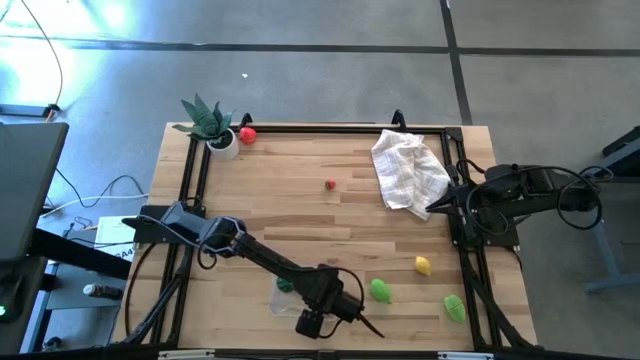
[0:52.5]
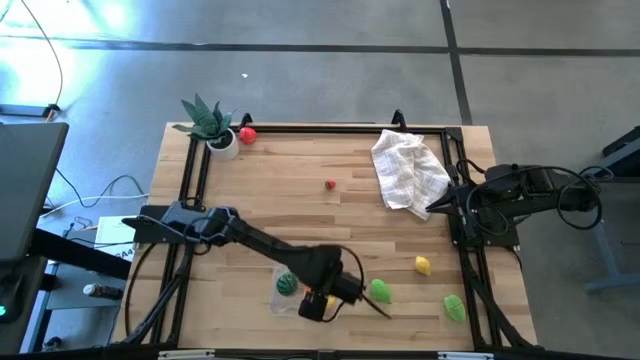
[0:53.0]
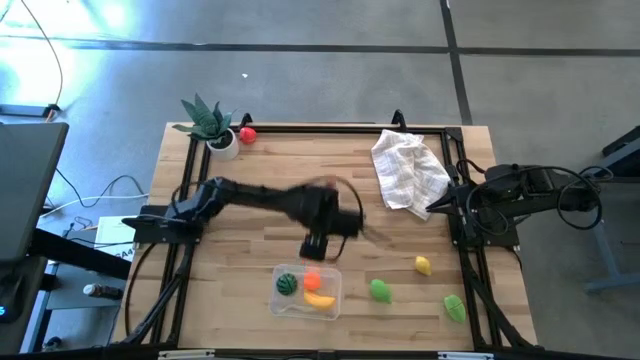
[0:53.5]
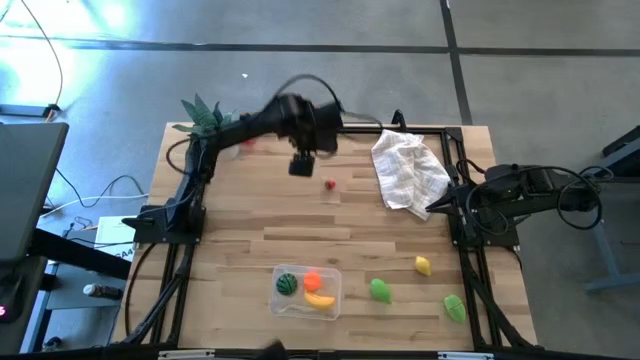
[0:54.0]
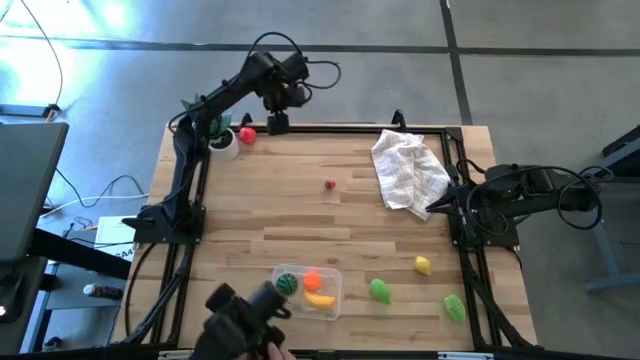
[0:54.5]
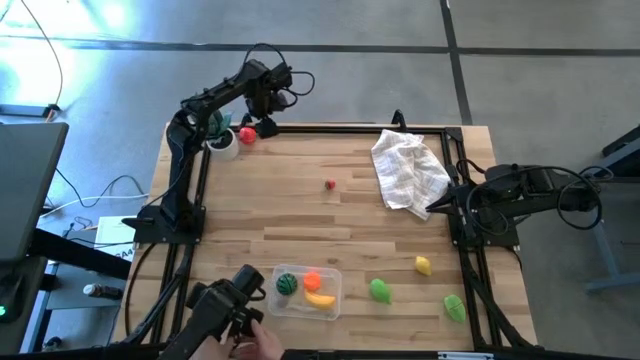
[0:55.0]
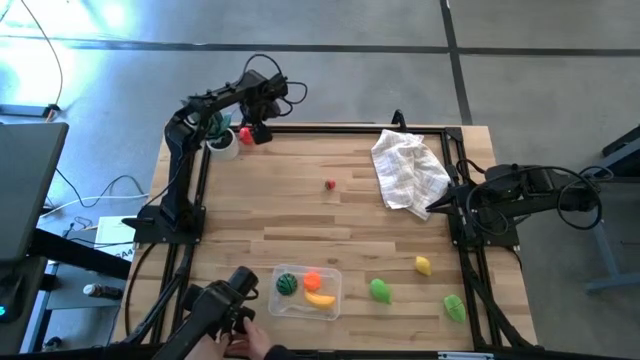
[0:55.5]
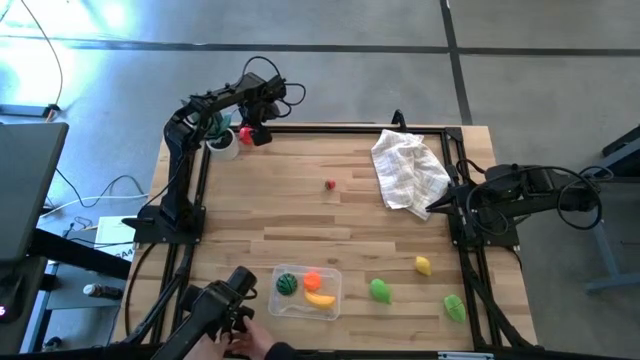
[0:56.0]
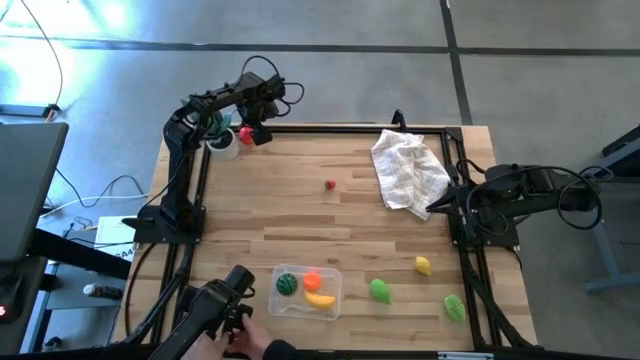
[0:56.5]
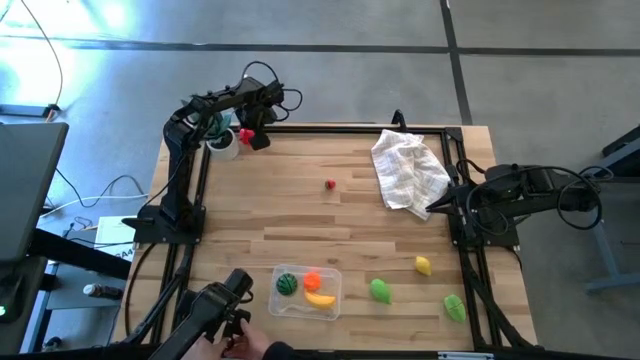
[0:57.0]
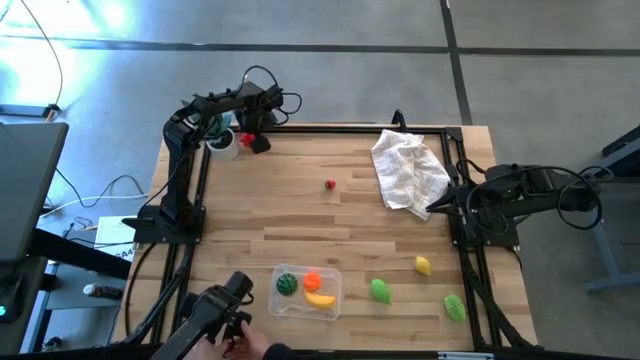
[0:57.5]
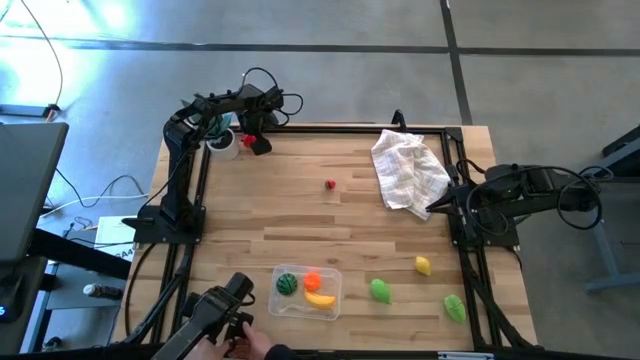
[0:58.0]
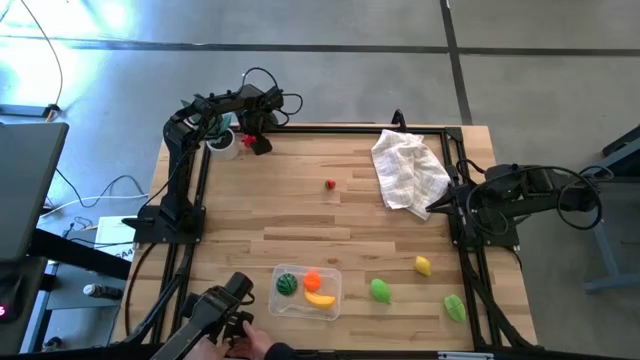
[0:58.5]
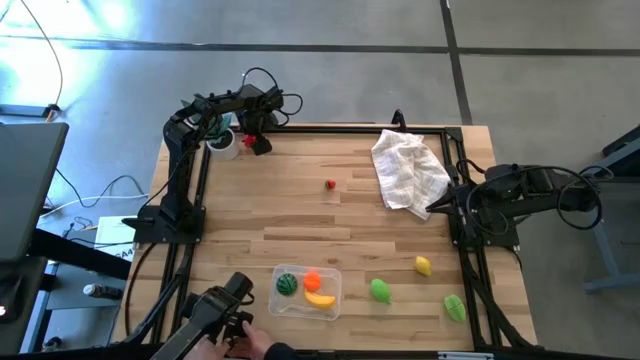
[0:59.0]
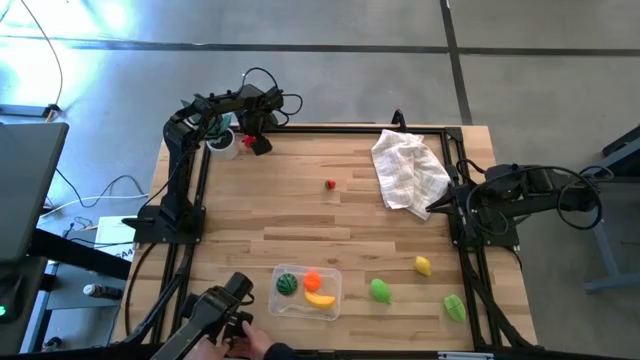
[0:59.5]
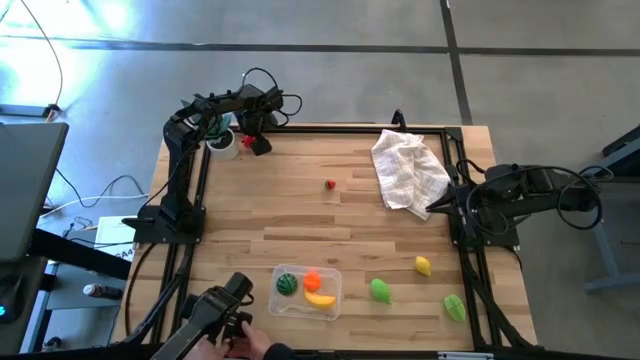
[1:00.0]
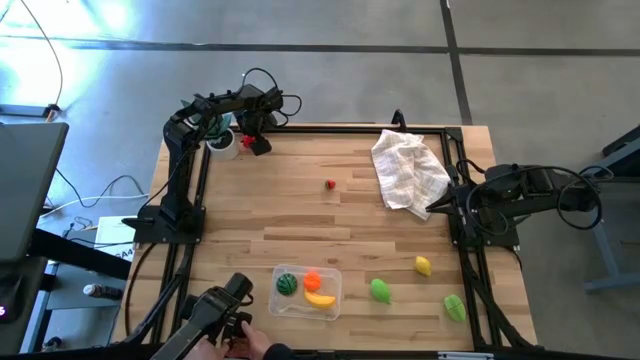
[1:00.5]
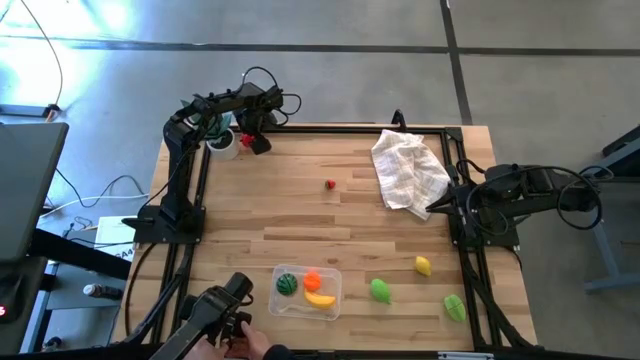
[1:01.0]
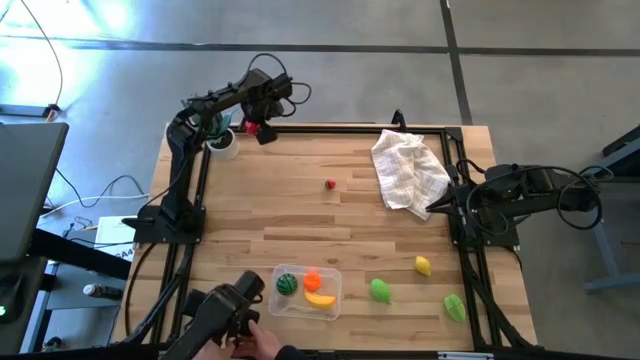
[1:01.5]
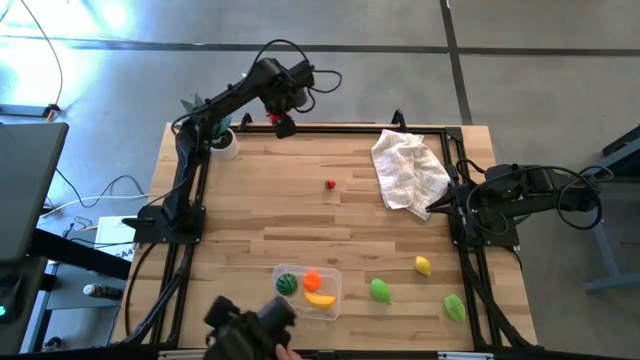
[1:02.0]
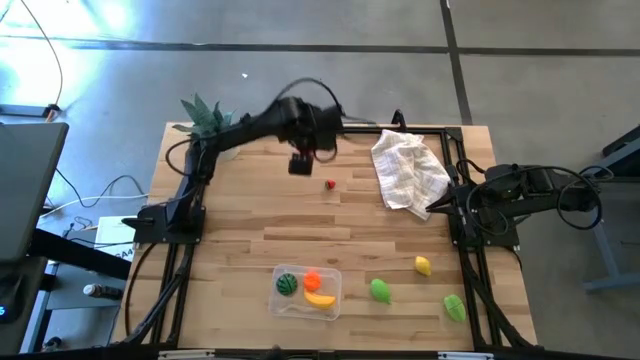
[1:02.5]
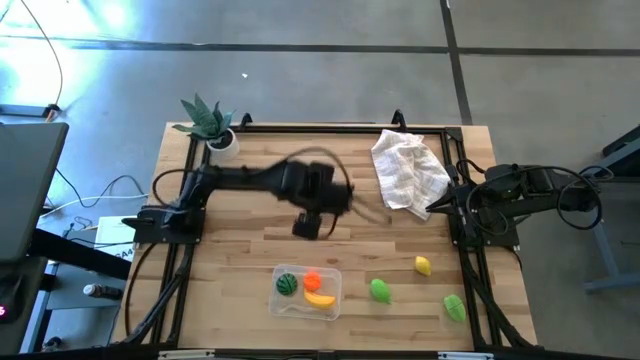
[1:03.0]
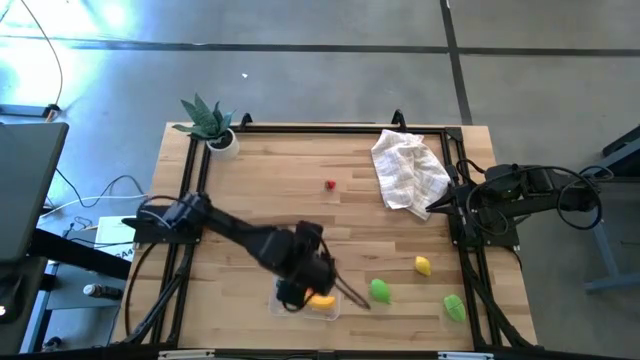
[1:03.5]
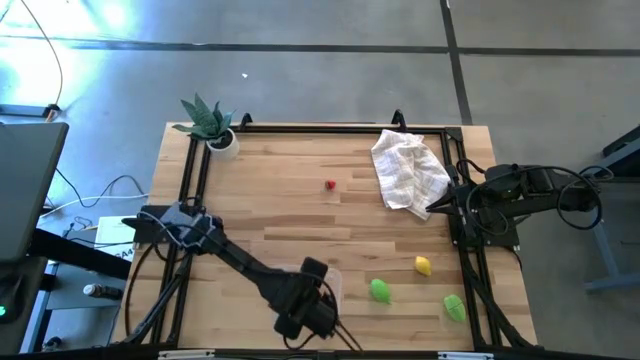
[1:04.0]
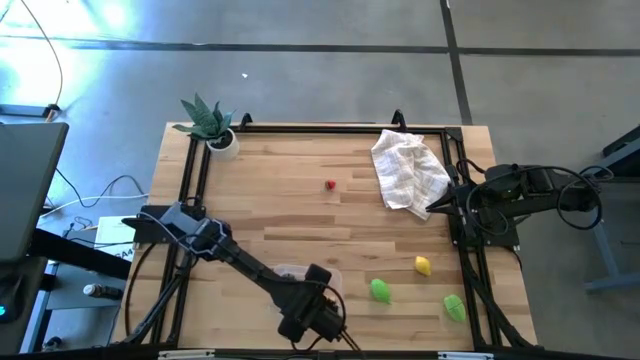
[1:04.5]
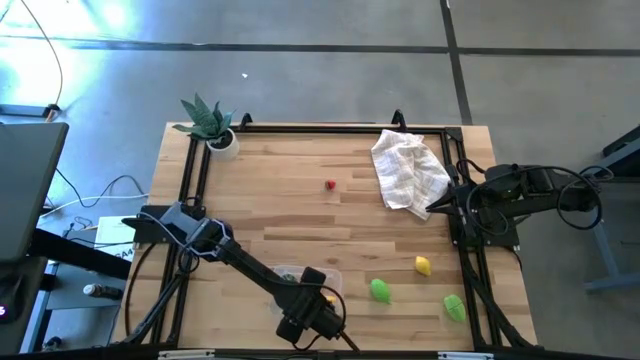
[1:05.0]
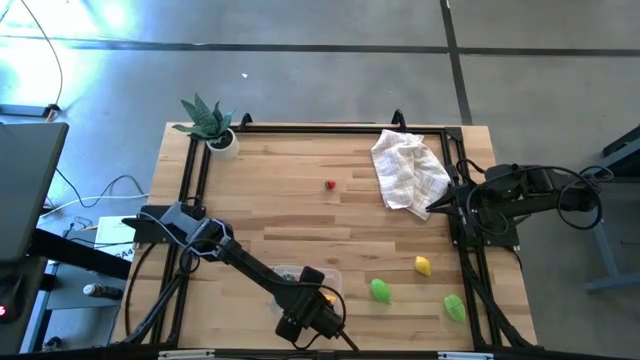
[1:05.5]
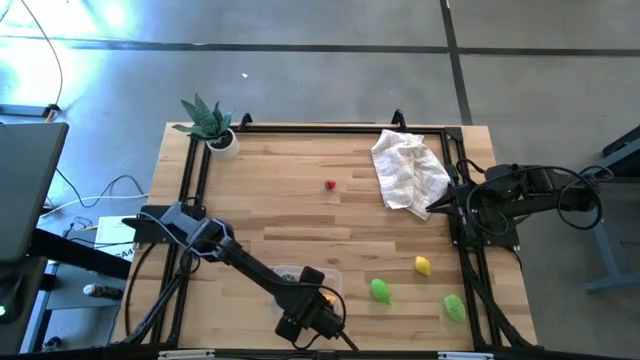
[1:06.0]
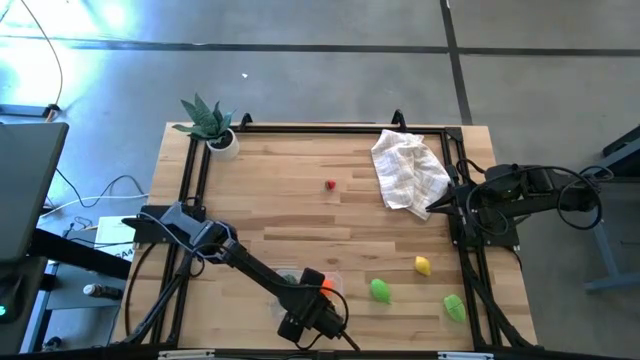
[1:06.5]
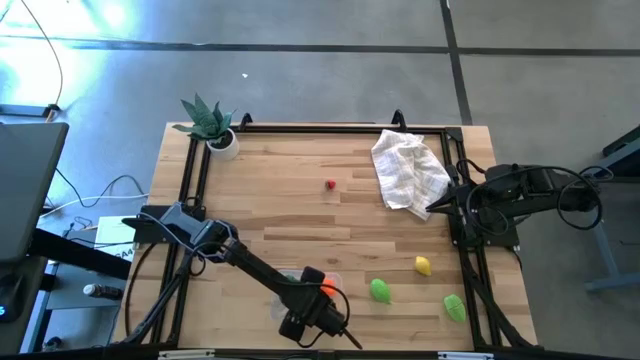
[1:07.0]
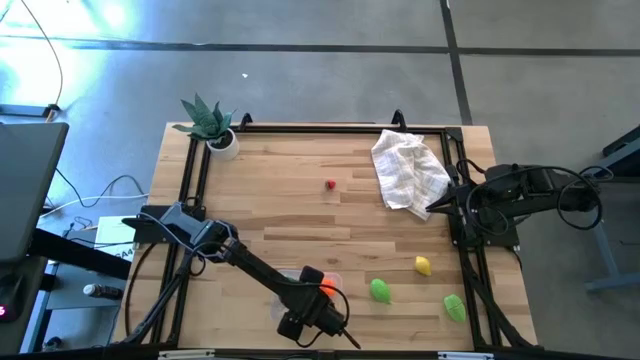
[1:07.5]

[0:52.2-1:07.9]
Task: Pick and placing Produce into tupperware
Put the apple into the bin

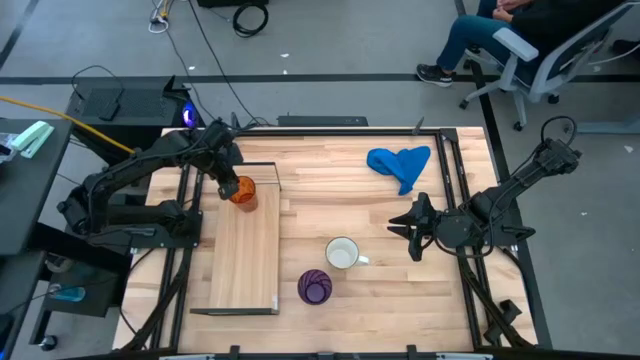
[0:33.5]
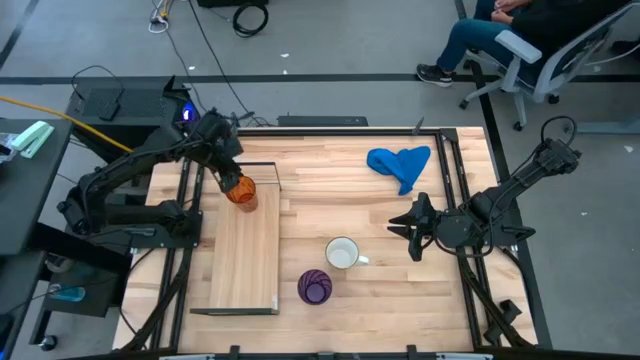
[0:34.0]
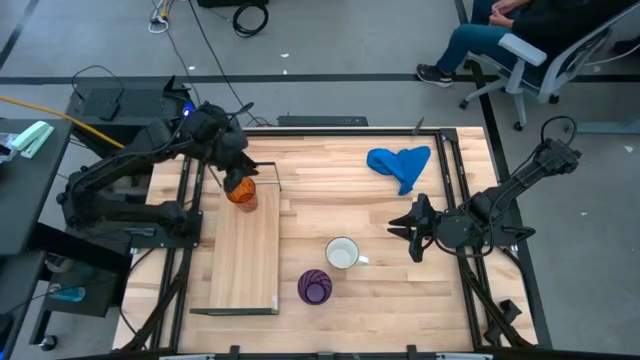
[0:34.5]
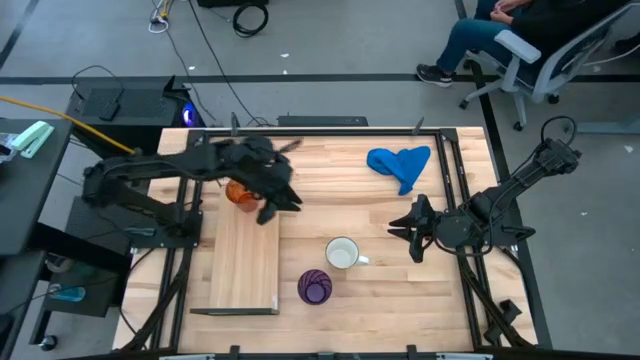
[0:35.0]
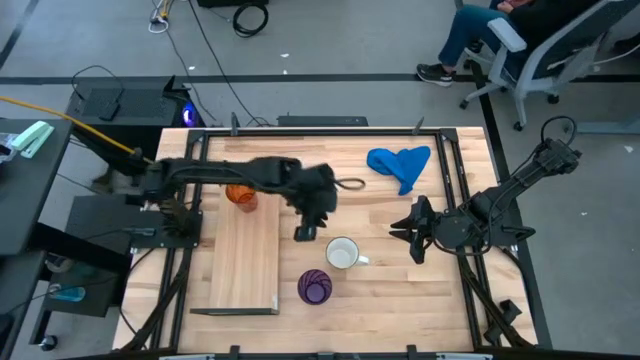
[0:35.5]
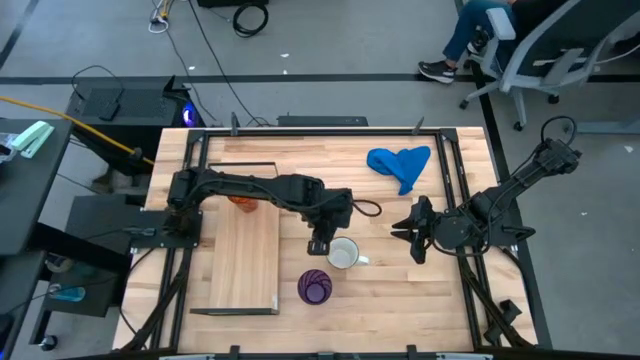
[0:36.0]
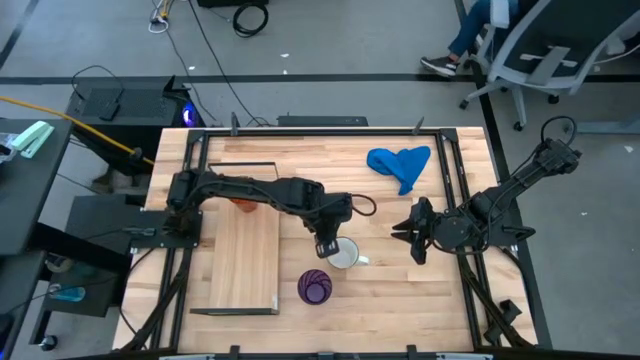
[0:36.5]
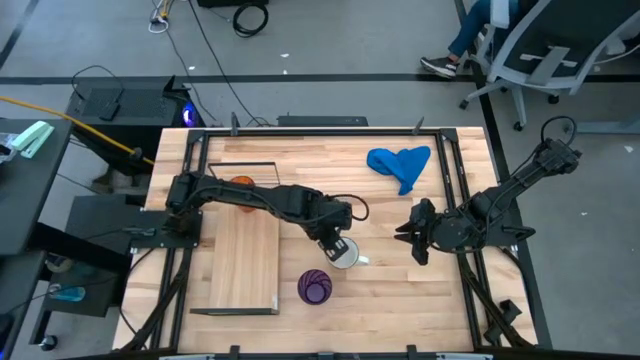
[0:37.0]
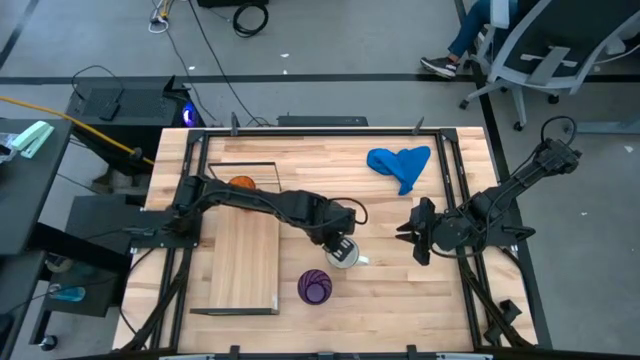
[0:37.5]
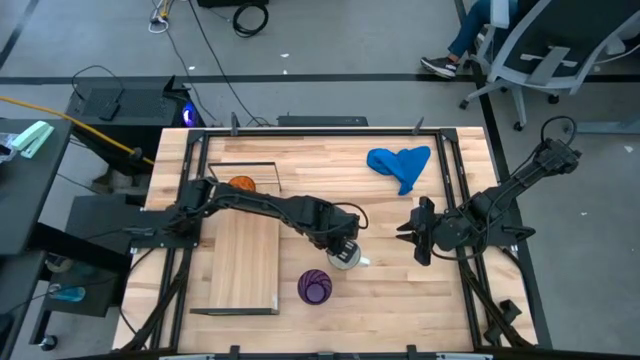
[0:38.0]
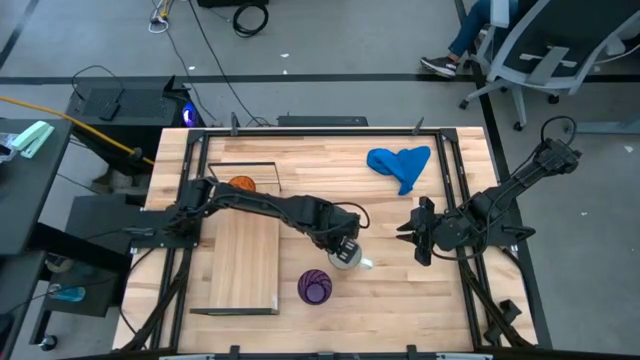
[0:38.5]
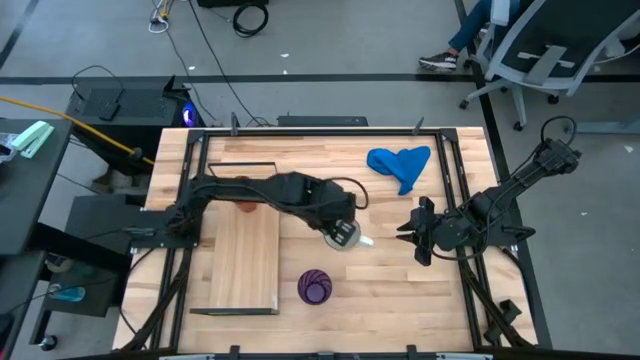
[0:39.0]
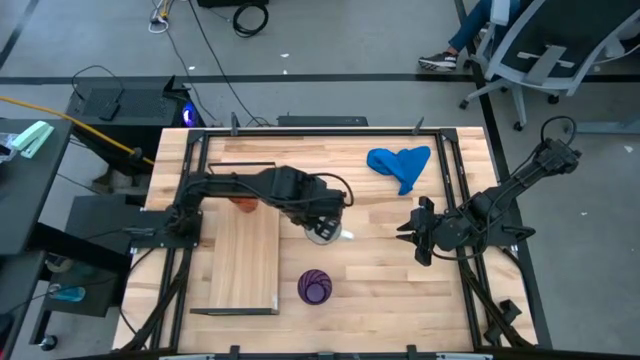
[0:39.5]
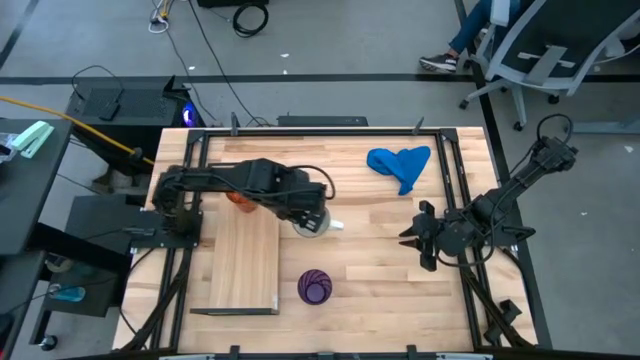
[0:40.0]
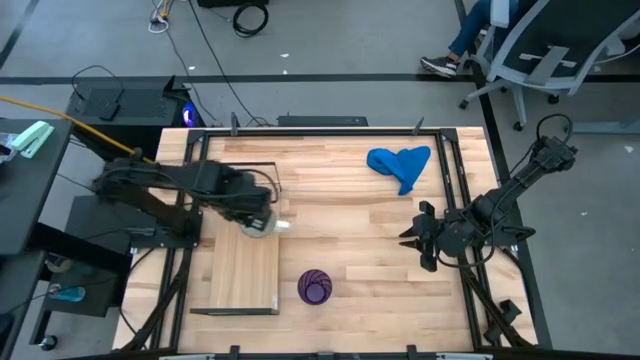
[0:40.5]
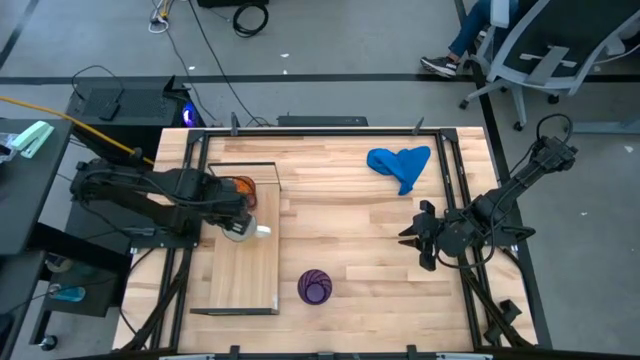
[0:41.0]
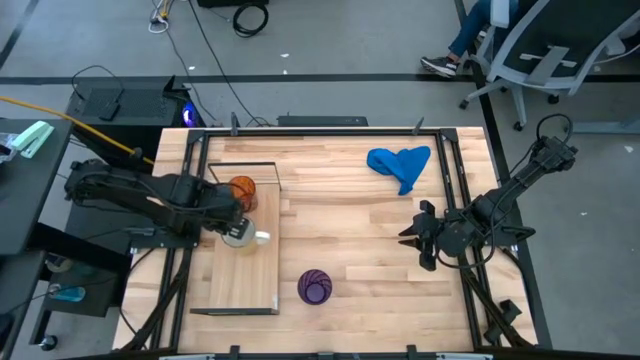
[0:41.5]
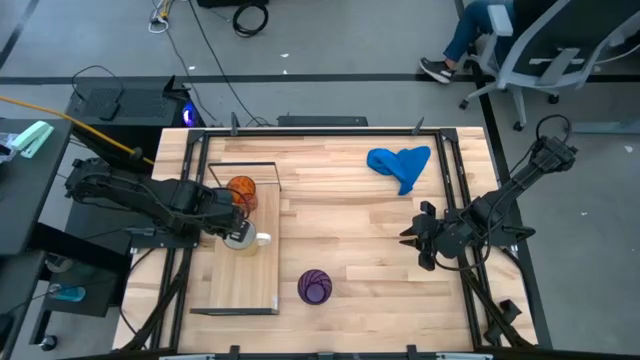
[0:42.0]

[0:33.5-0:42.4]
Task: Stack small to large cups/mugs on shelf
Put the yellow mug on the shelf
